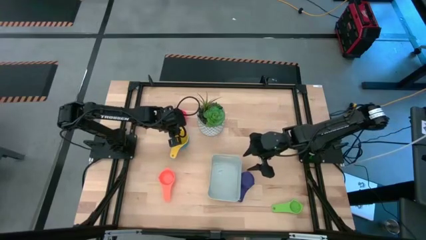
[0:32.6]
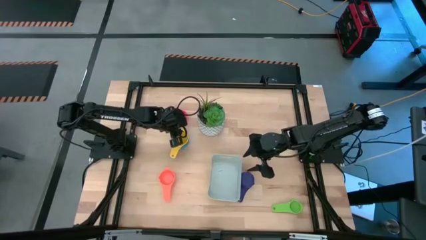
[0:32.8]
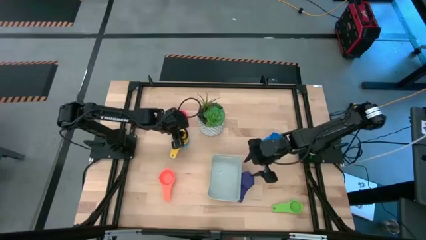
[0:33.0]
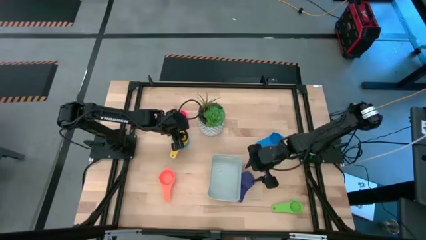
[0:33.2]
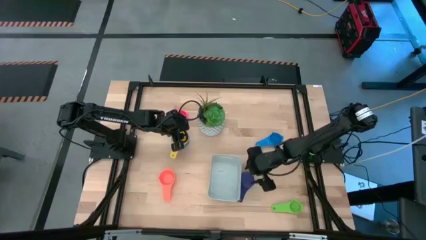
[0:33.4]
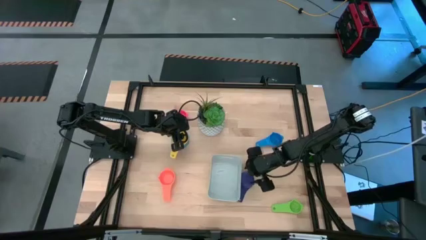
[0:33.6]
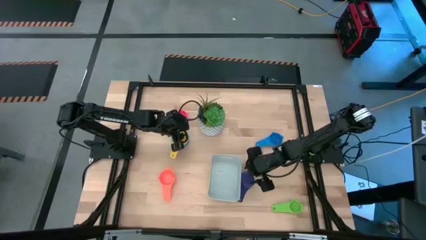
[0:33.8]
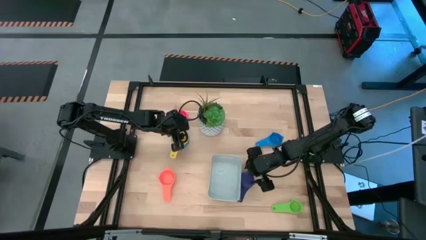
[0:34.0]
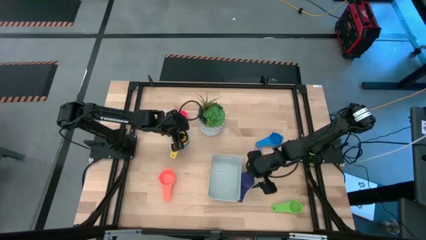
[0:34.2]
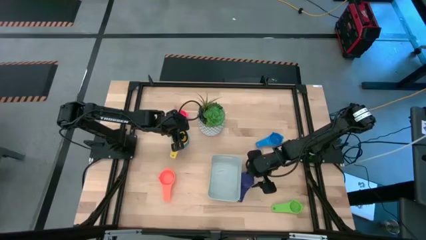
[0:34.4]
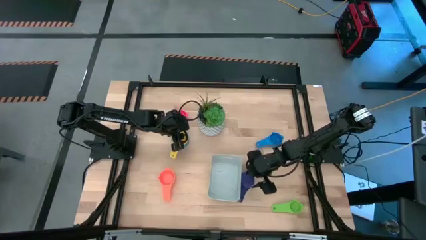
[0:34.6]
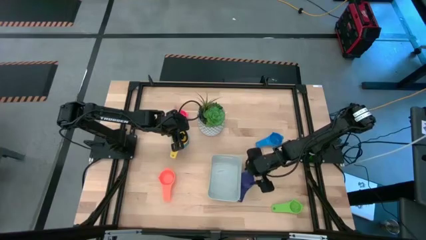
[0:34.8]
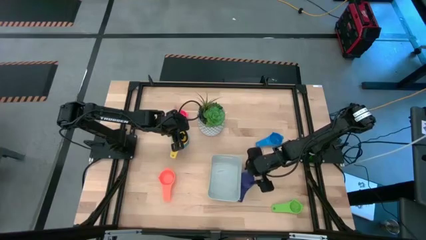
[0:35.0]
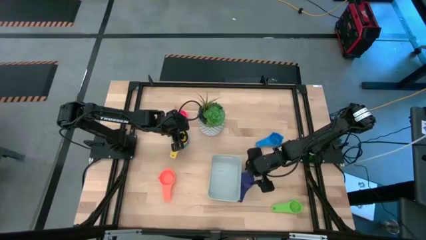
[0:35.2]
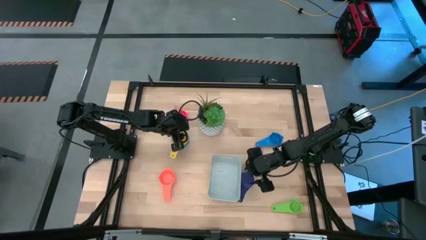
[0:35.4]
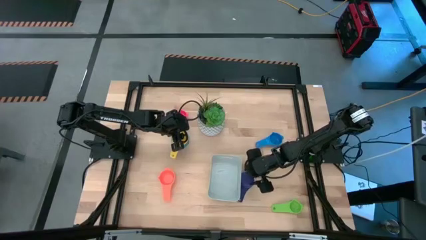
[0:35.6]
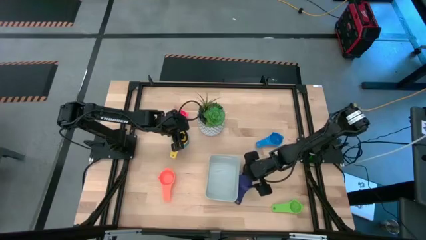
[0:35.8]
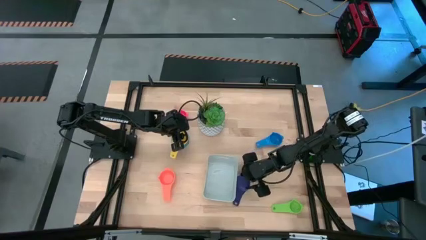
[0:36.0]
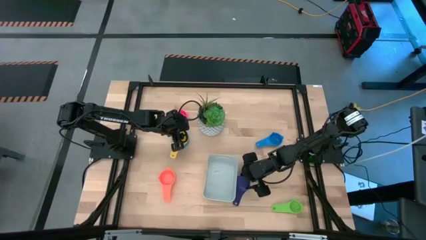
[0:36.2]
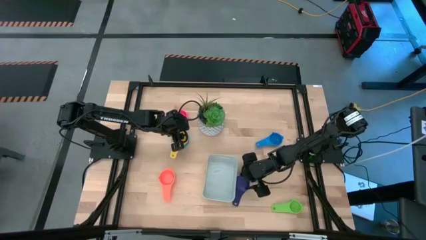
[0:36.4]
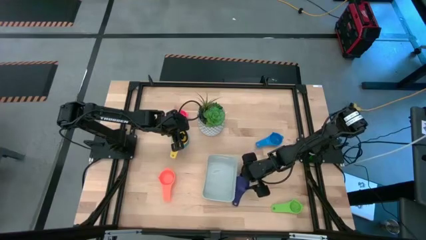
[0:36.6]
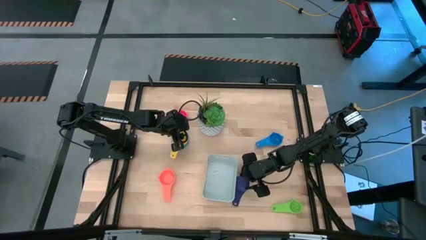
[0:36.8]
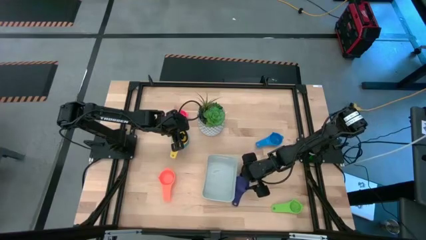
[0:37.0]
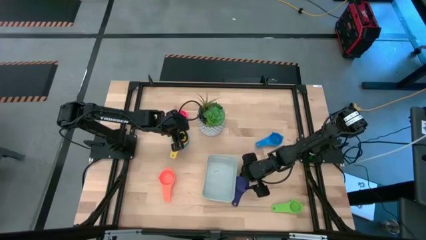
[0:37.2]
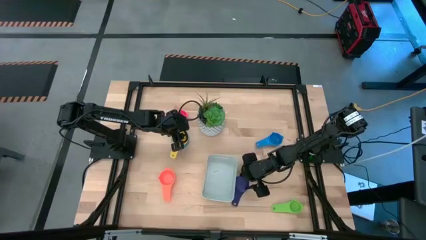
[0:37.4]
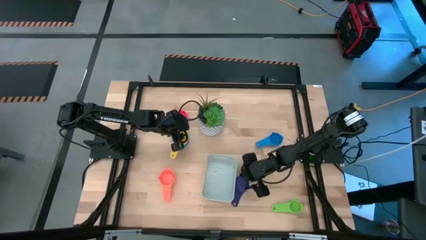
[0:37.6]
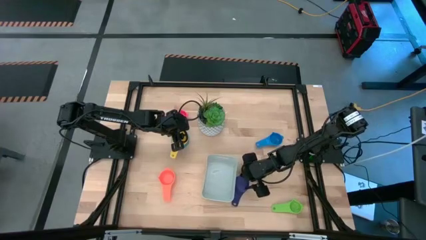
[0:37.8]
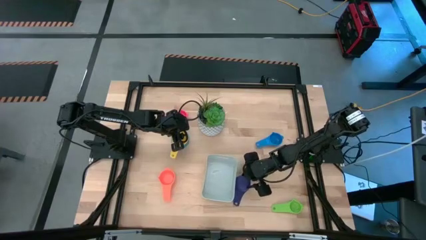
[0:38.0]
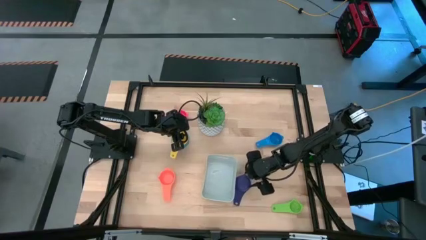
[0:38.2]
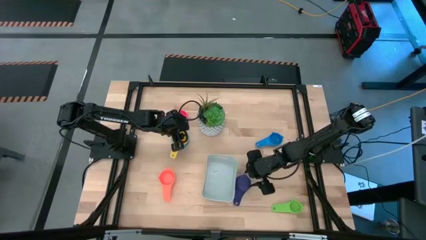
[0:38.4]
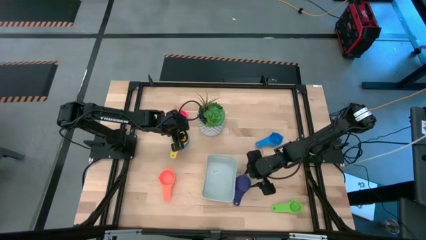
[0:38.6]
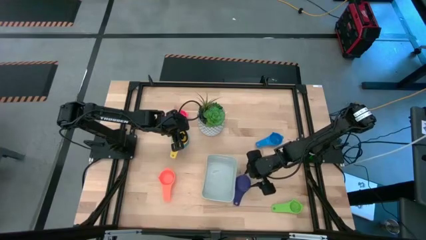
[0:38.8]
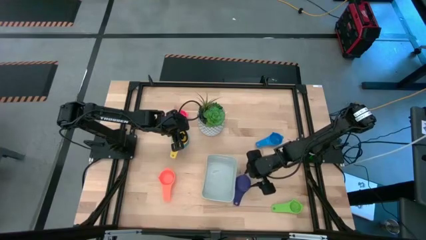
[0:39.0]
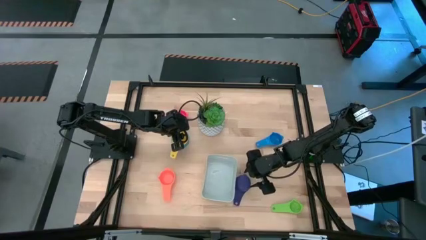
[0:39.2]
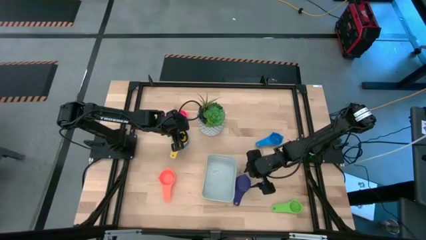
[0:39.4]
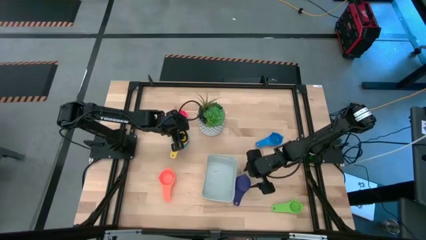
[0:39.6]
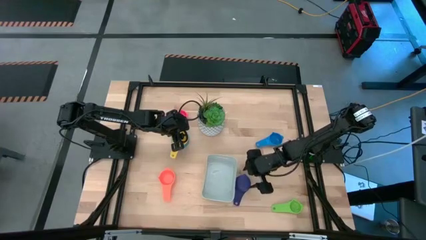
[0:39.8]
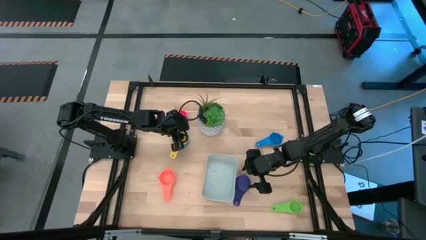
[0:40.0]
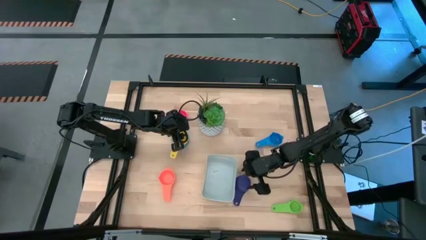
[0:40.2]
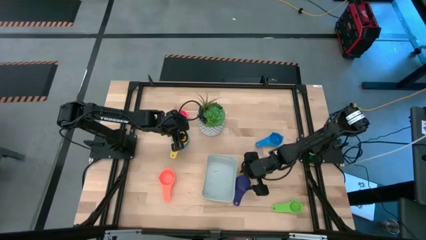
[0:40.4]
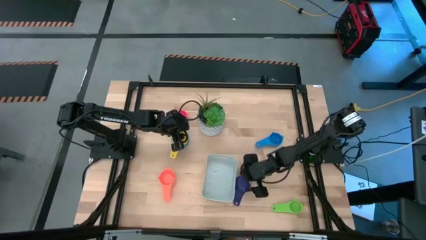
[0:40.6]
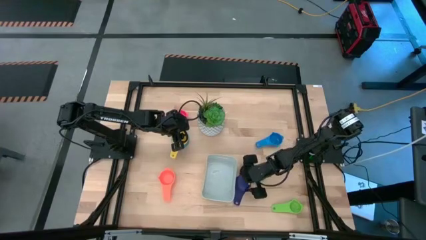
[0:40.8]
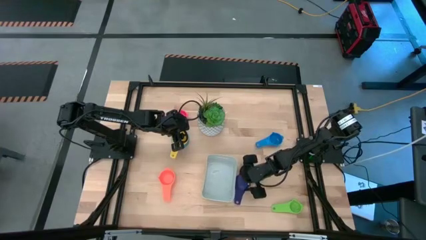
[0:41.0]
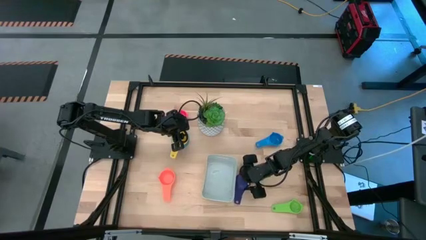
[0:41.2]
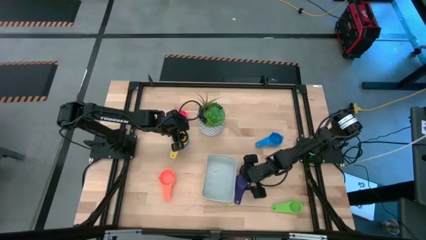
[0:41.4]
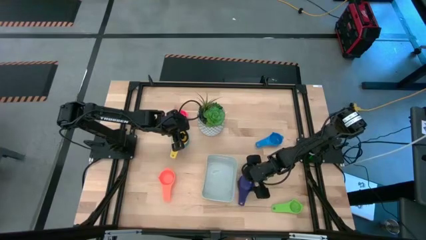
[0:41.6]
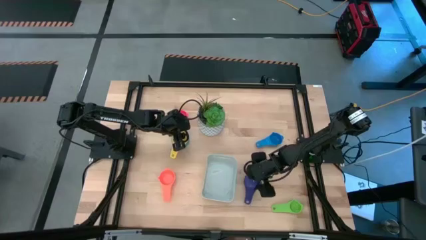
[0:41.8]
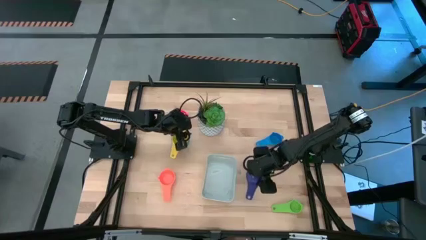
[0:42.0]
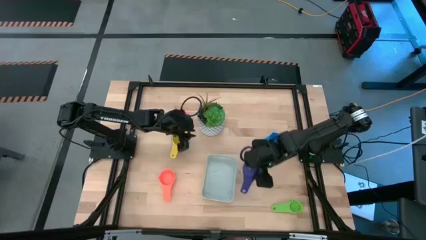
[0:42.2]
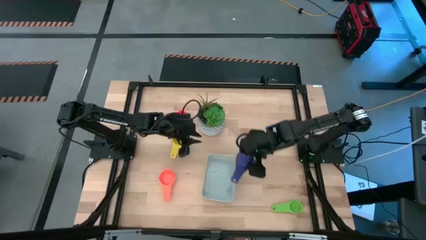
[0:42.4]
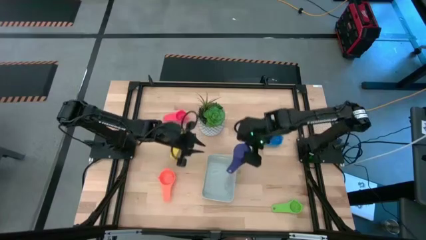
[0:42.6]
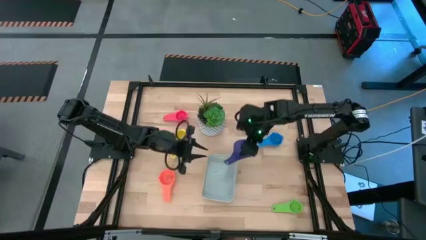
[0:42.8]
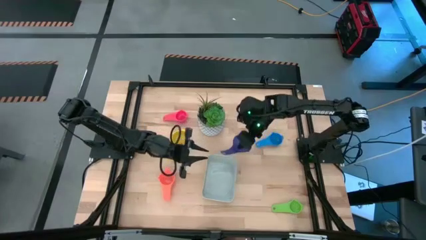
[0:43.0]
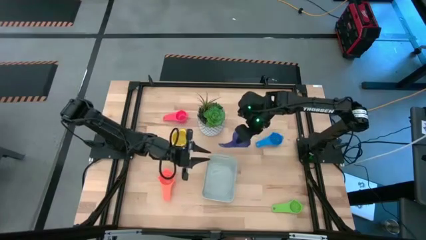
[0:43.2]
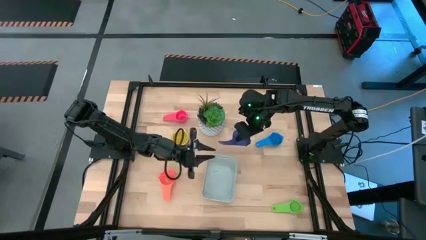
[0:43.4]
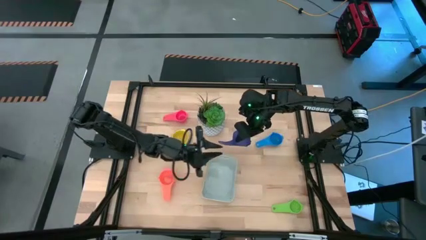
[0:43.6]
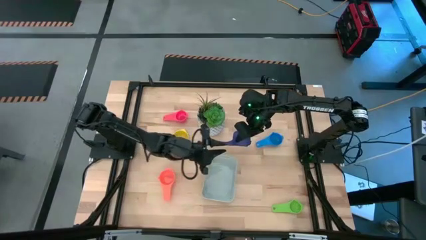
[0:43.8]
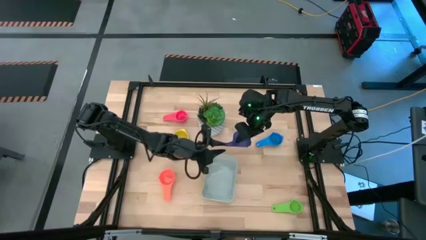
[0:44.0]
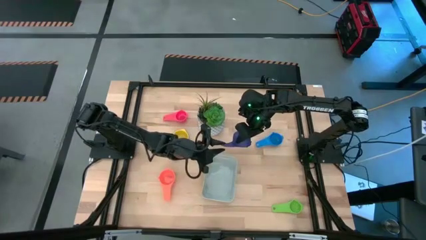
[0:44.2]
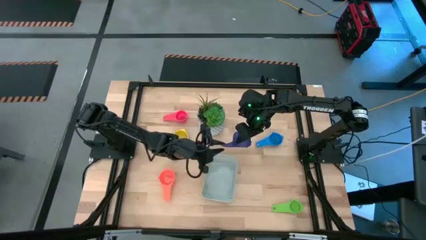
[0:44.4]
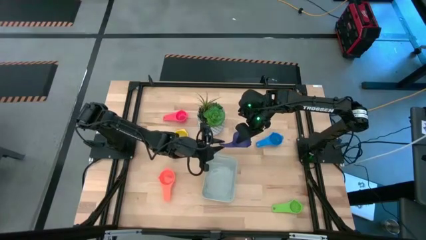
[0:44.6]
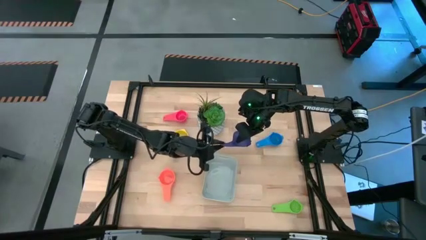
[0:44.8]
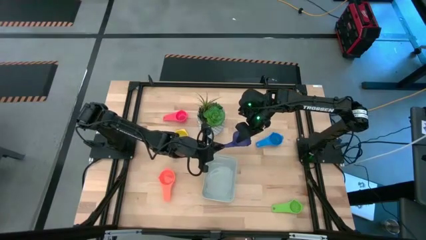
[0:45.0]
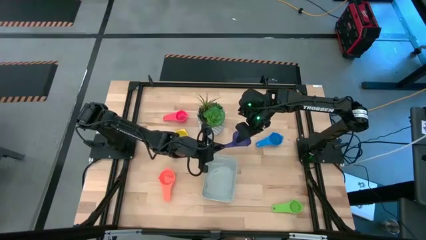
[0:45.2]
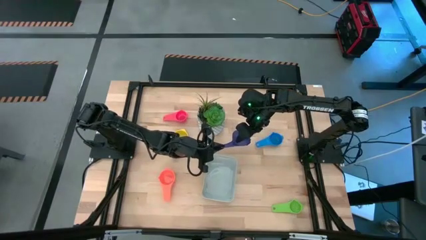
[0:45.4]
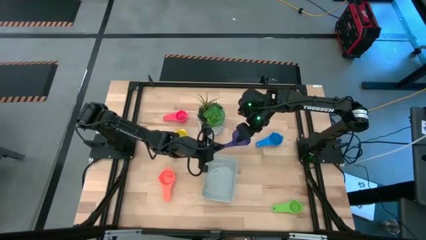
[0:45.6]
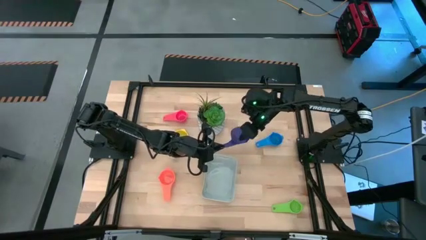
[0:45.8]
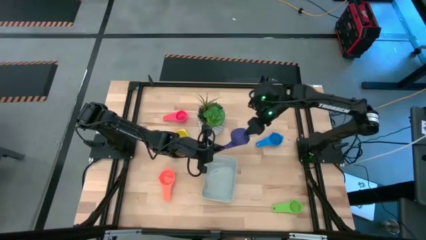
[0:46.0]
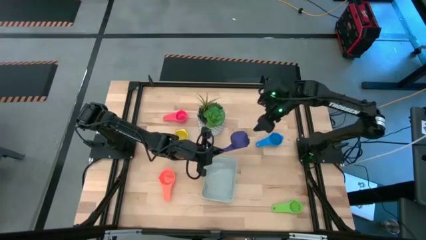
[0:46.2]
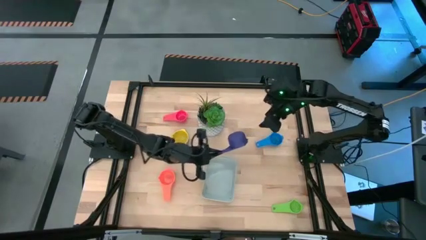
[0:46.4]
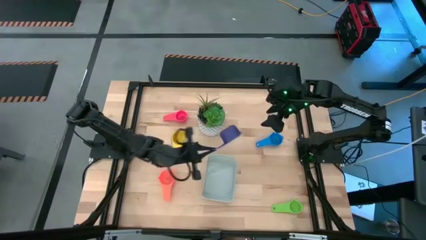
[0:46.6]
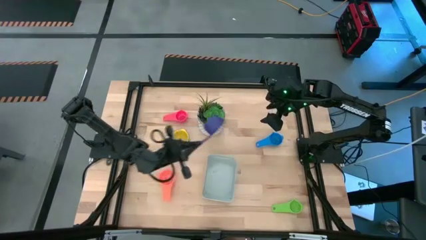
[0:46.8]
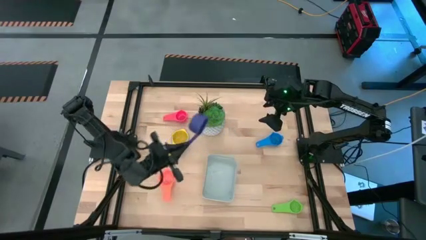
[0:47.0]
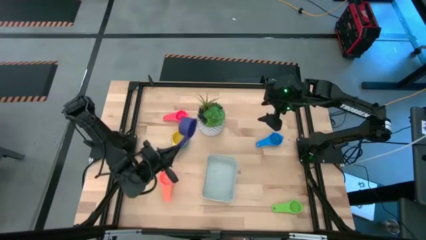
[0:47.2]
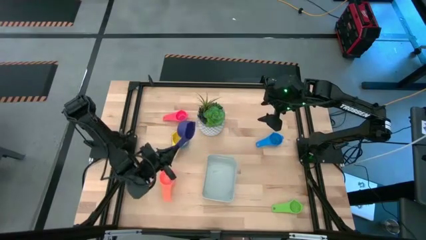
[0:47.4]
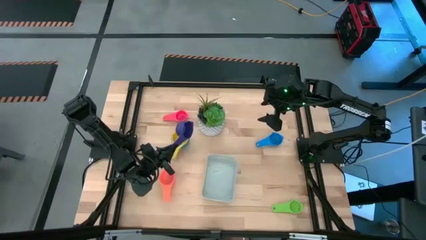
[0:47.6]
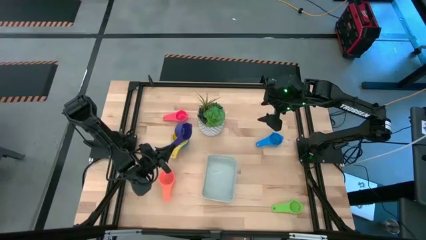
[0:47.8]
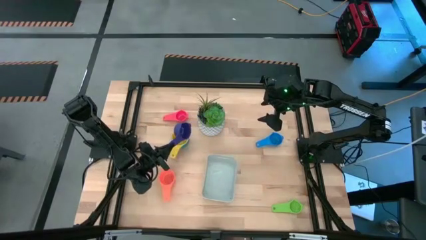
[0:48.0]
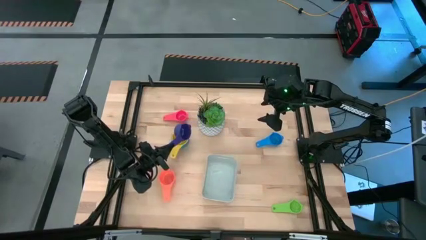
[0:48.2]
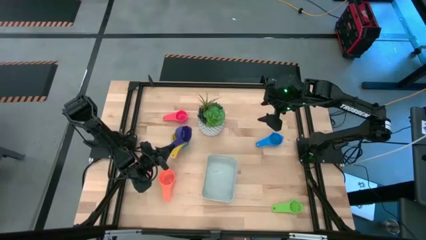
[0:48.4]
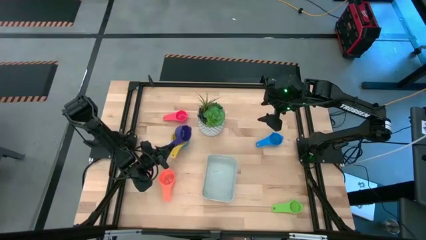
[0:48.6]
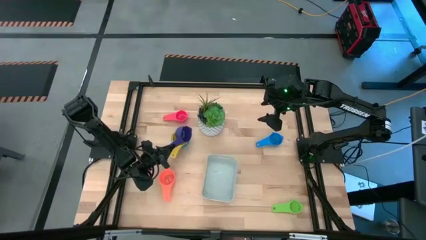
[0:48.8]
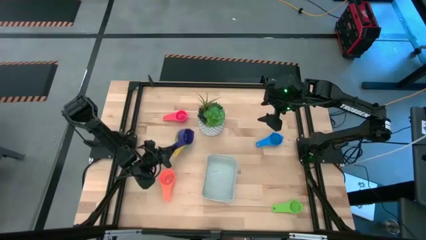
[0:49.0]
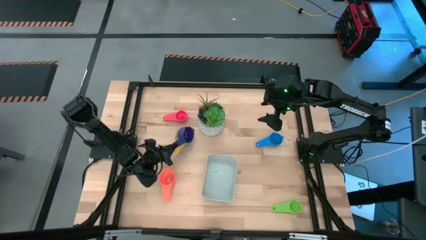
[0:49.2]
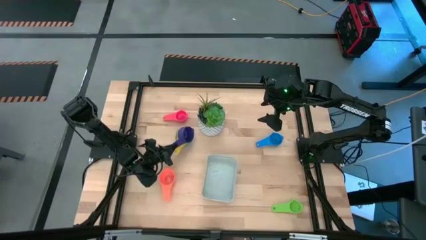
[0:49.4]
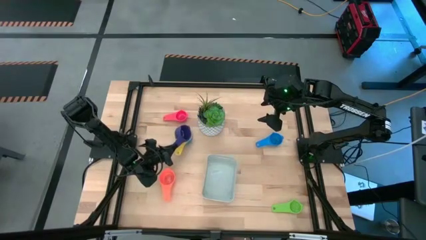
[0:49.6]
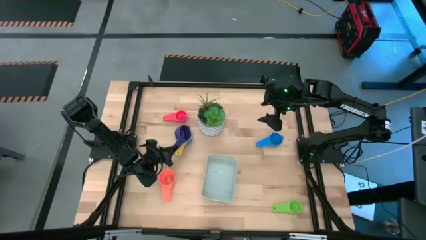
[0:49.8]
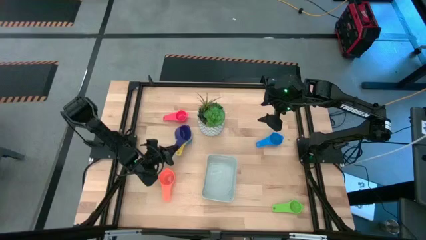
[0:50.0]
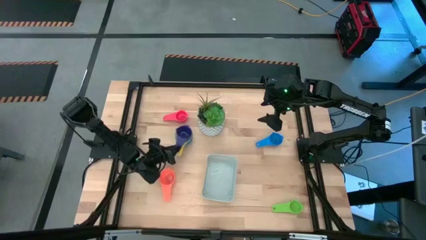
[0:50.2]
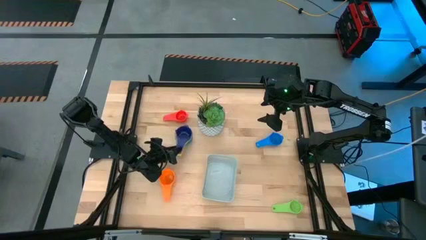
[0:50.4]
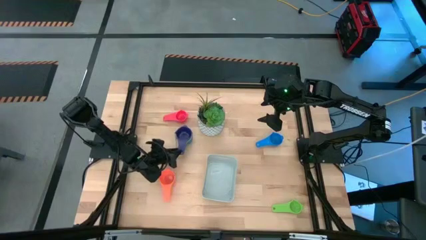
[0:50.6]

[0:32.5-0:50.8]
Task: Nest measuring cups in basket
Stack the purple measuring cup on top of the yellow measuring cup
